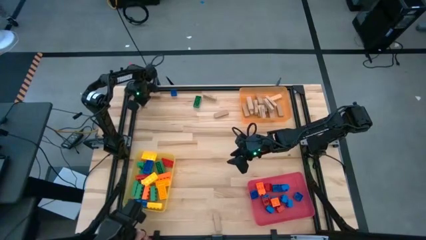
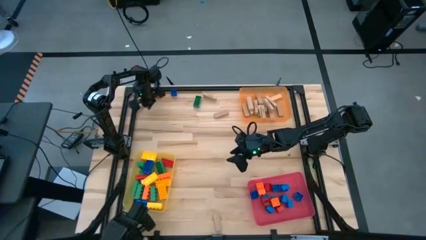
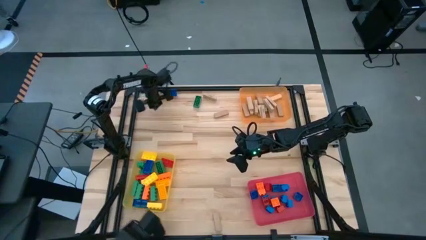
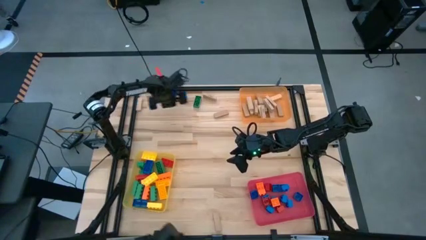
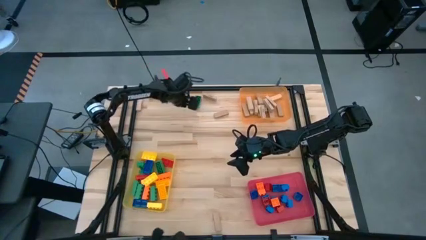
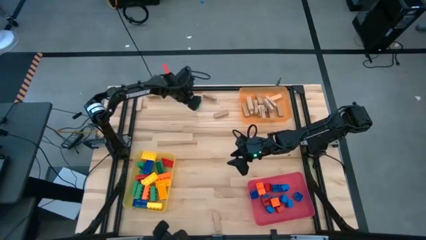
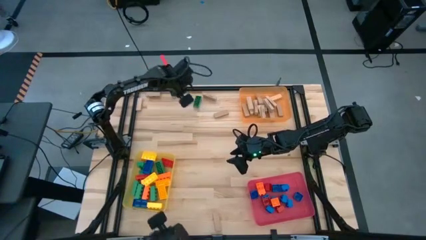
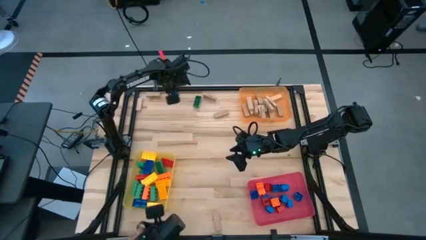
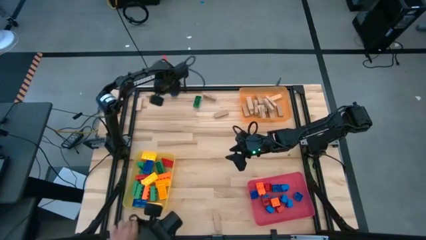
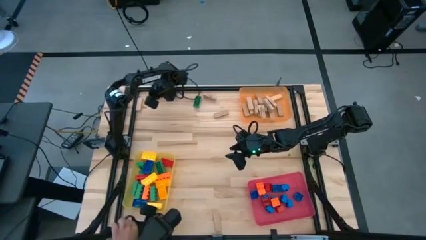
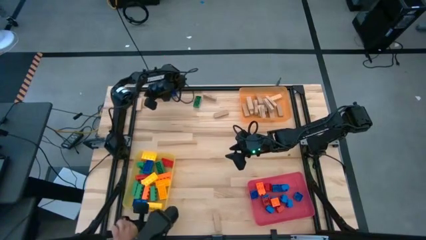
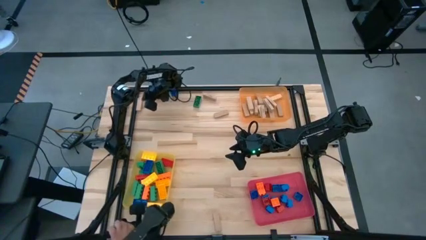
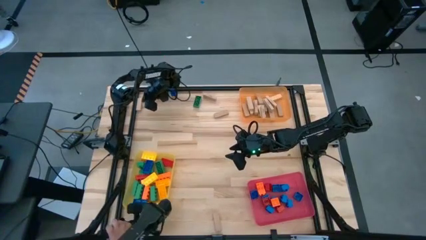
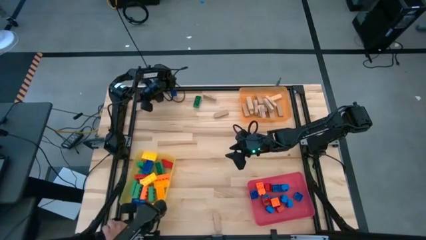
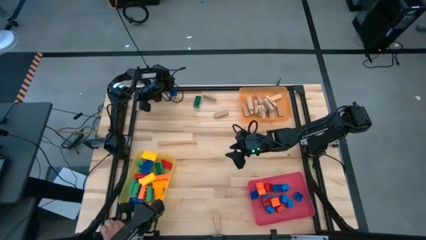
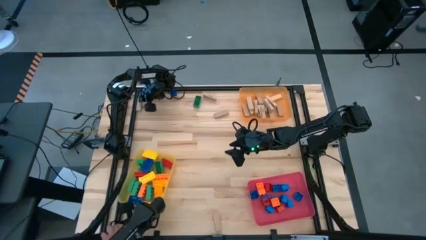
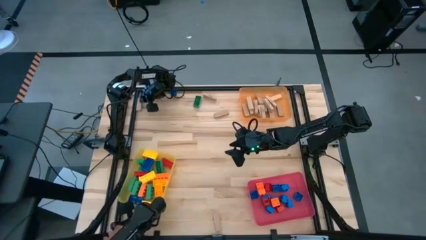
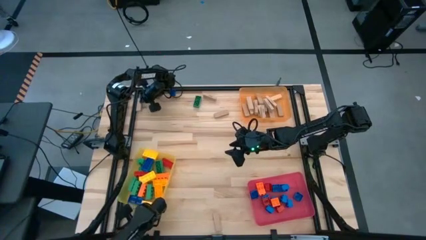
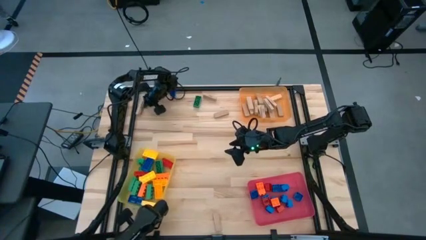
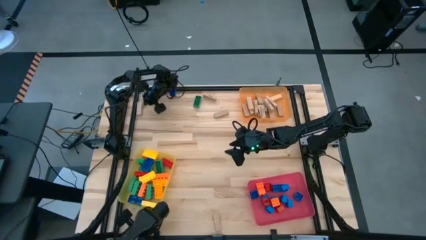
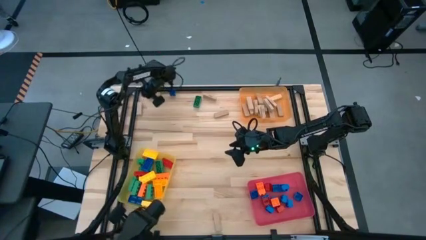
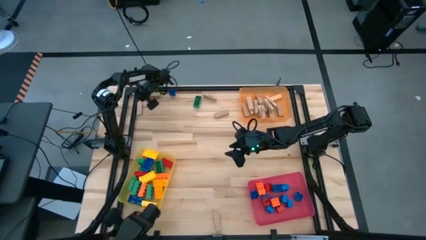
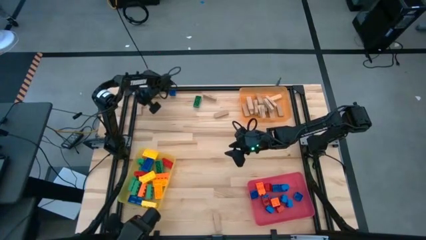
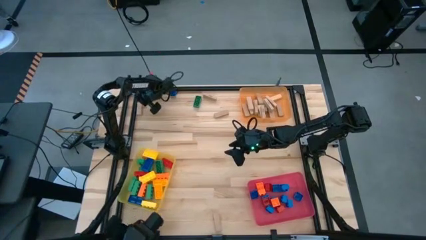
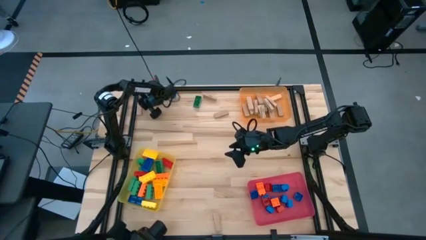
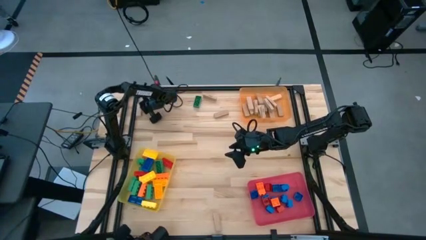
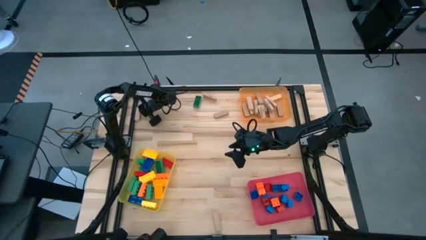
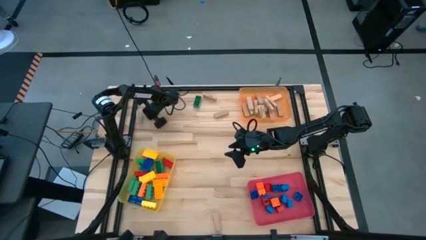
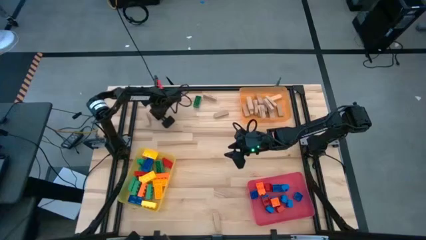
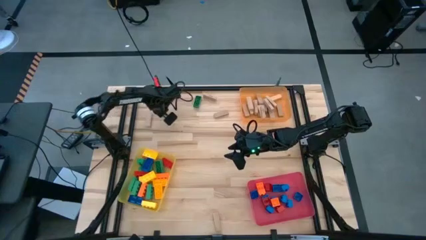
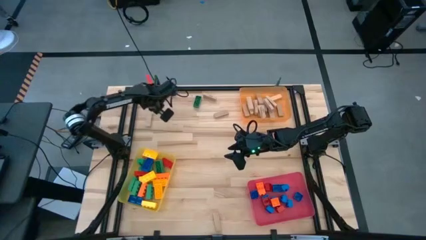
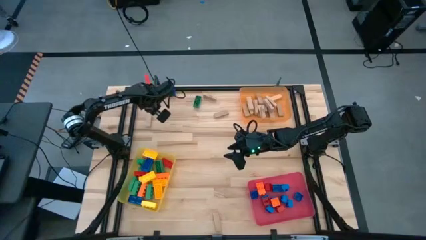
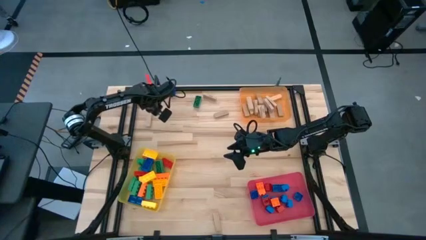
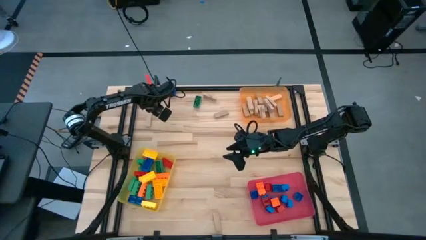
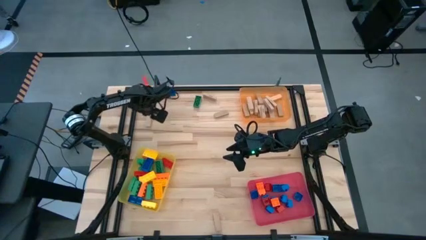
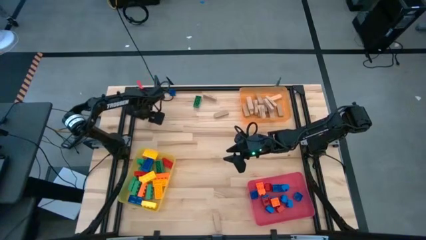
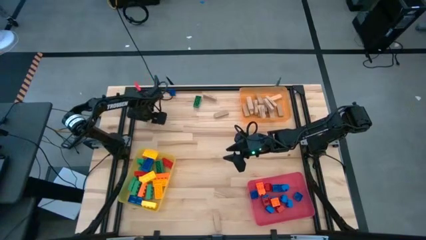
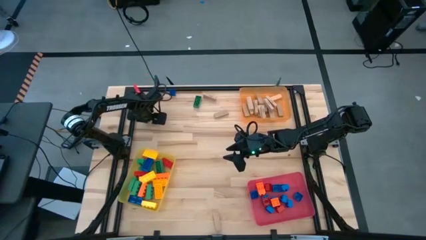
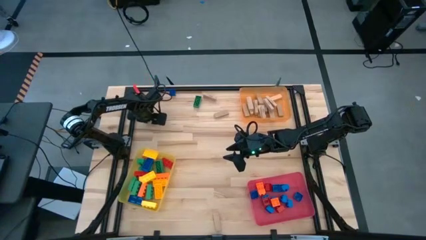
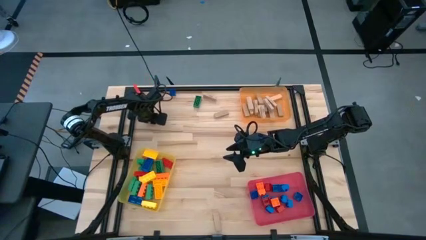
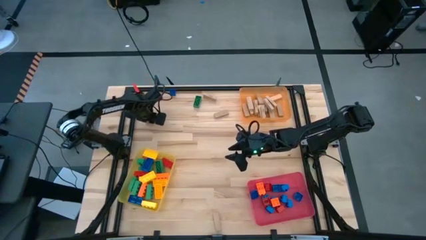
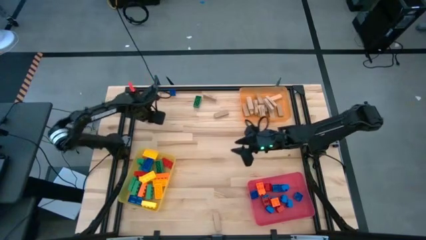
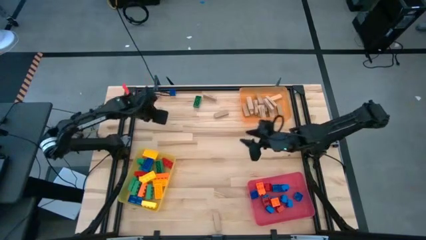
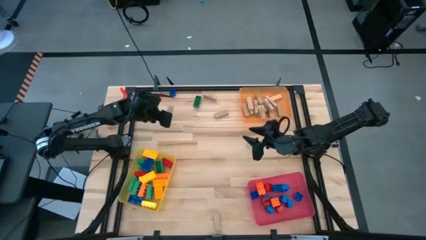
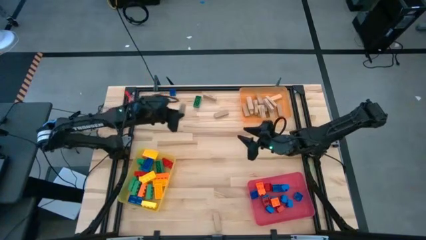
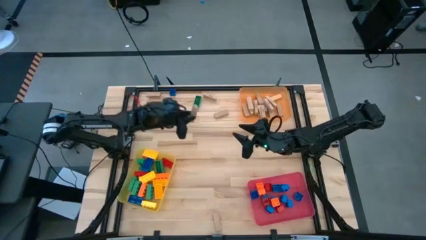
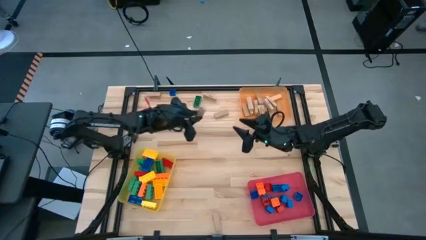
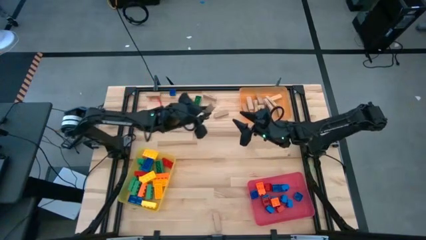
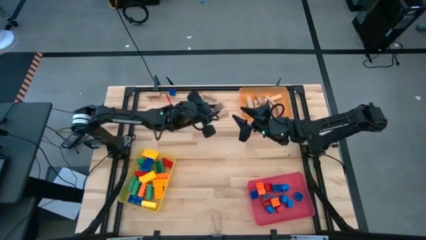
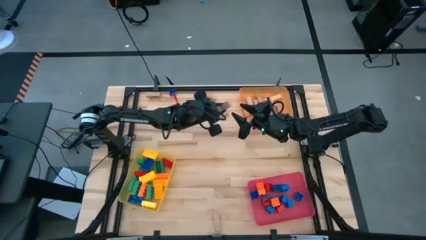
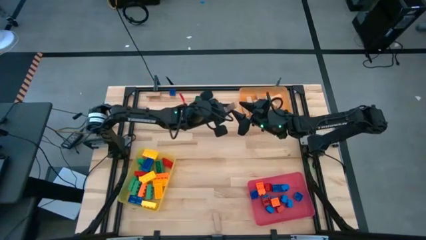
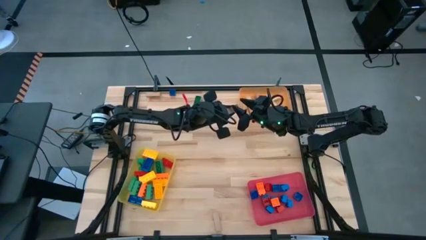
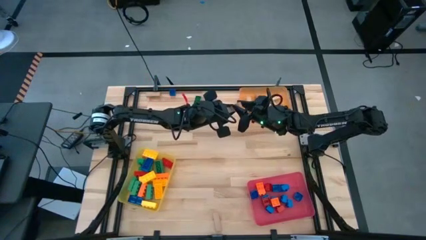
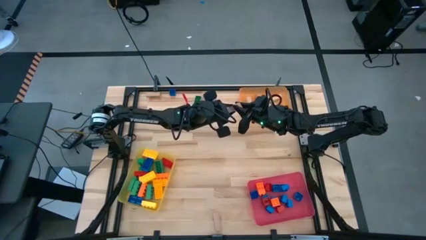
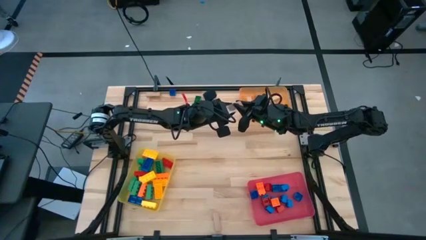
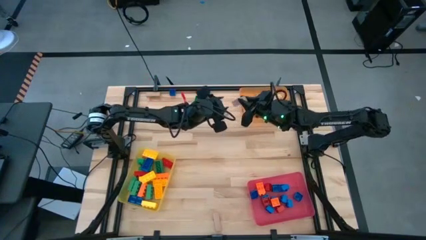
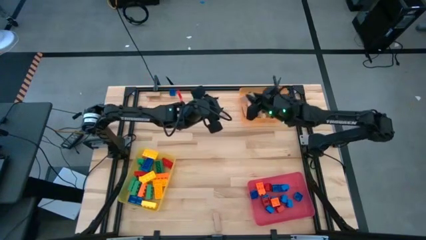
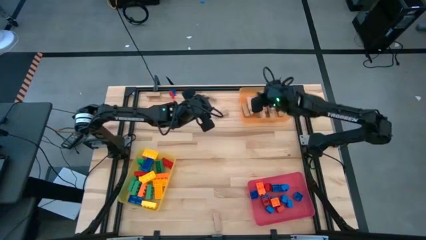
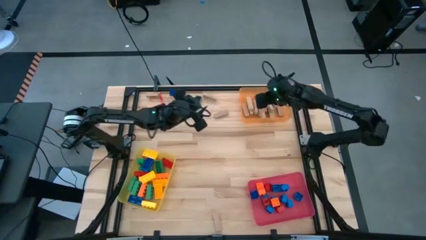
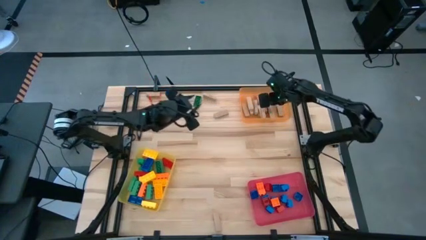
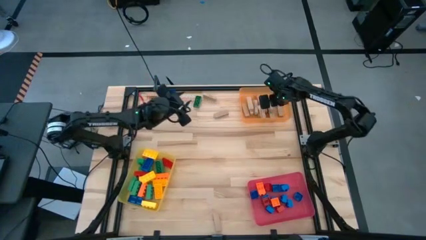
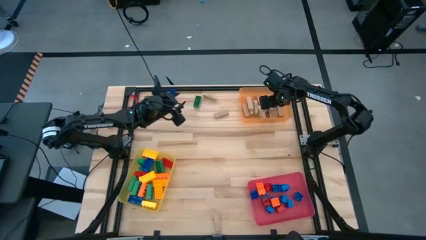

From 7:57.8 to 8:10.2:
Task: Sort blocks by size
Put the brown block into the orange bin

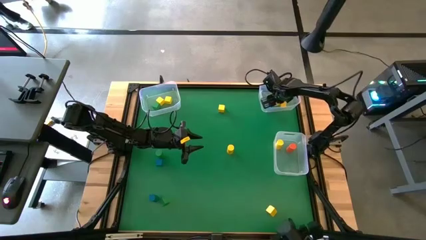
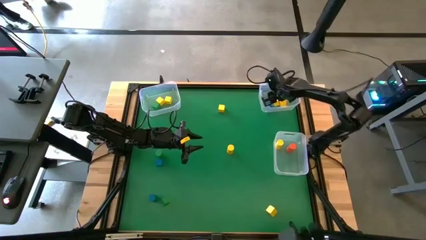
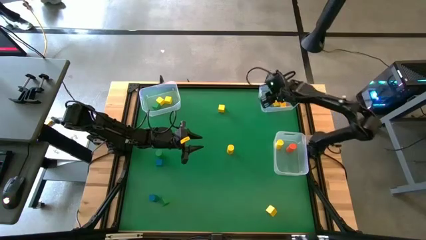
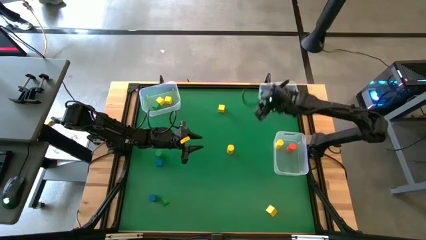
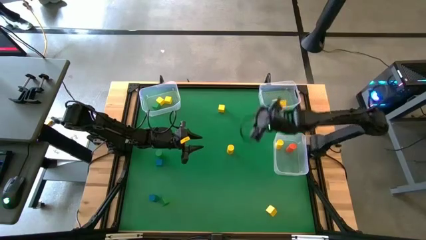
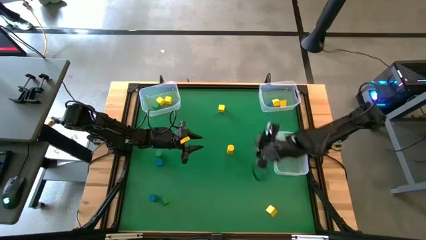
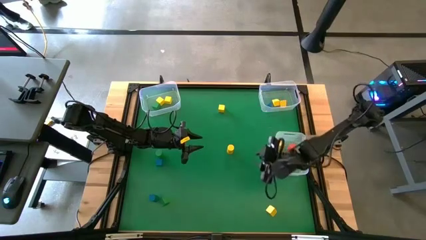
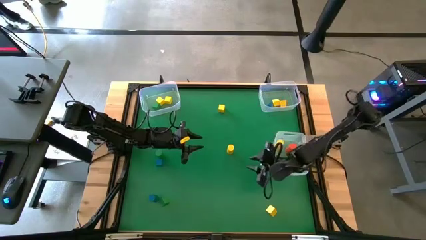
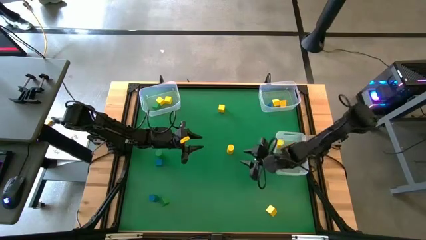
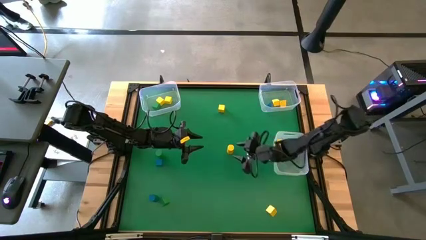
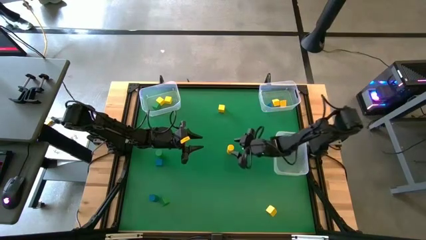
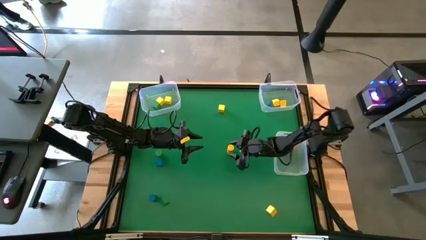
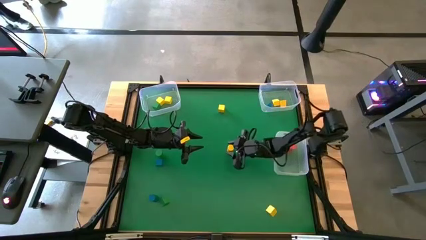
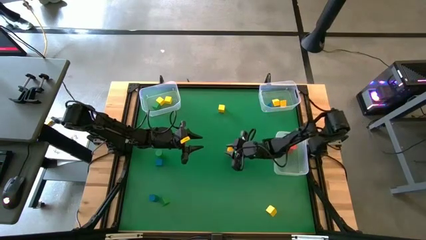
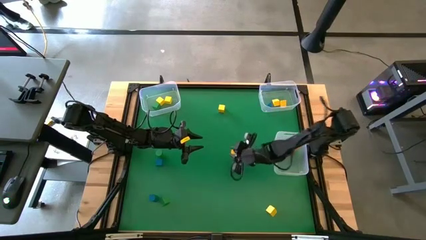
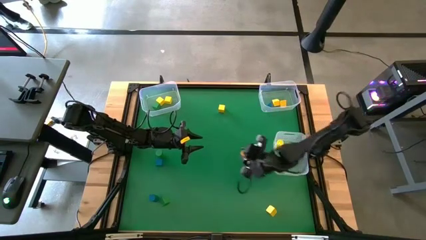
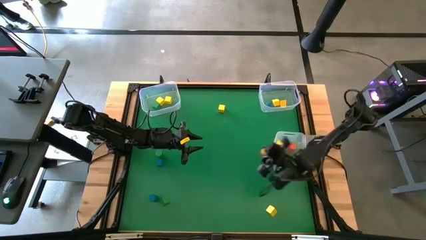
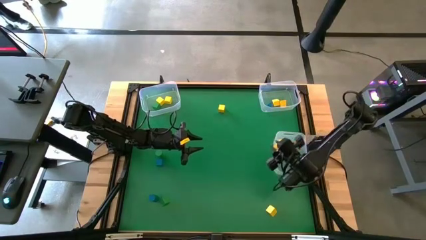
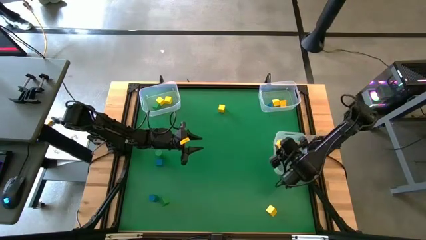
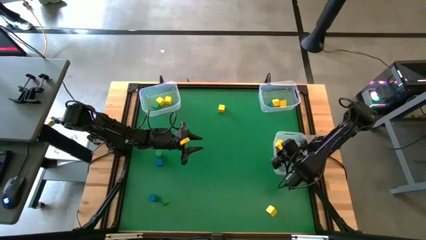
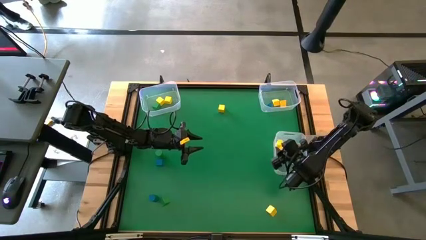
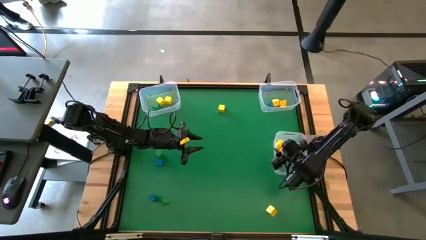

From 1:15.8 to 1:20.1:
Task: Sort blocks by size
Put the yellow cylindrical block into the bottom transparent bin

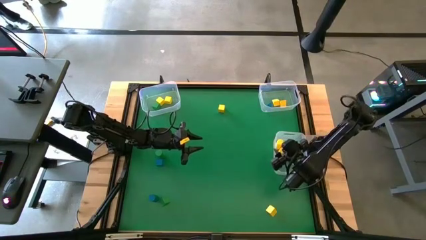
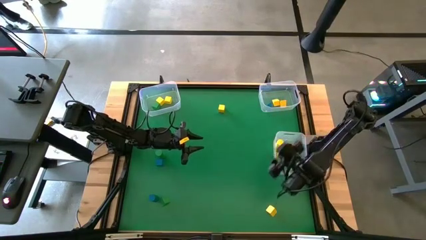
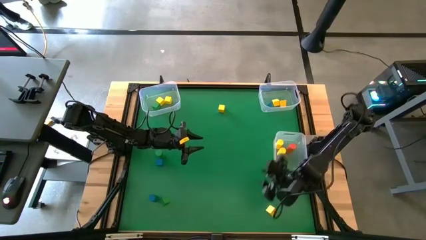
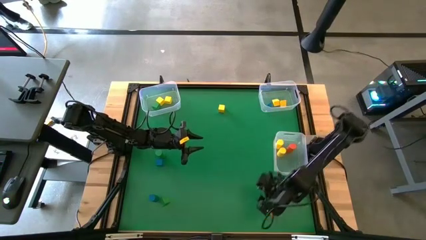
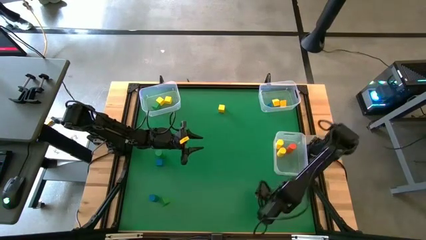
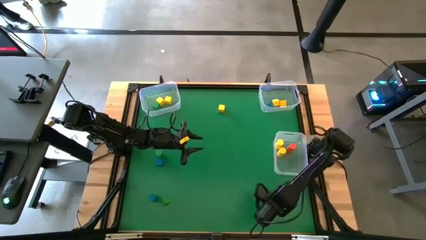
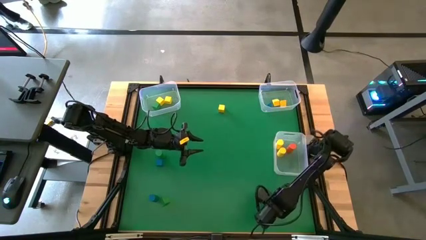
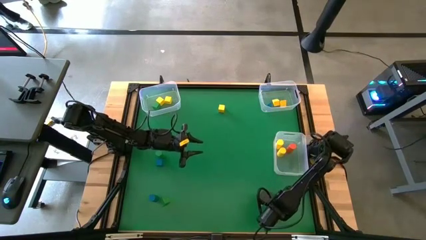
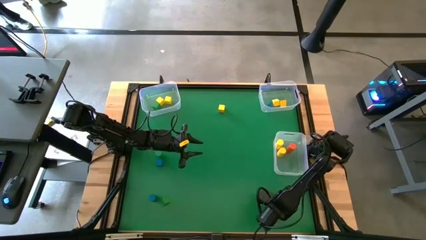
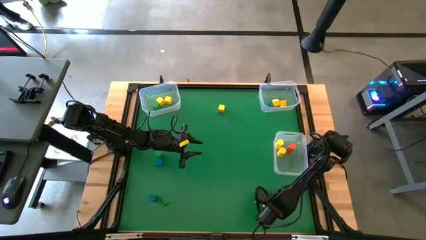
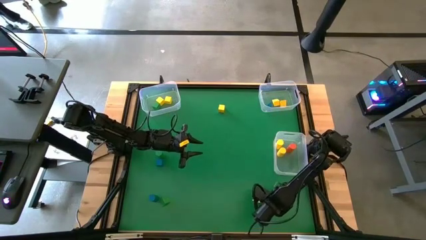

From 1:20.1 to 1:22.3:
Put the yellow triangular block into the top right transparent bin
